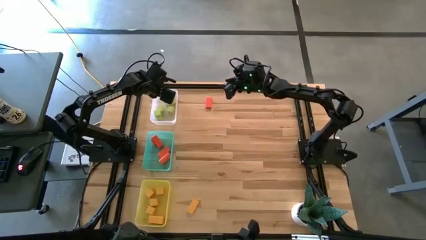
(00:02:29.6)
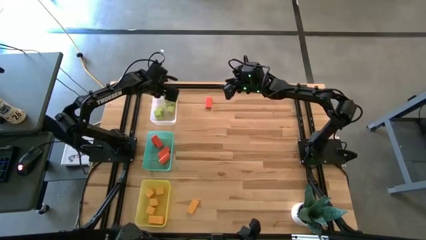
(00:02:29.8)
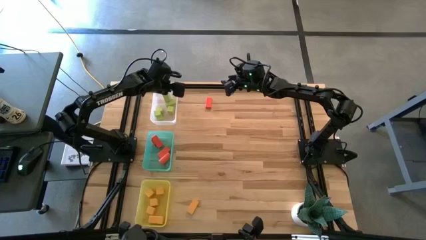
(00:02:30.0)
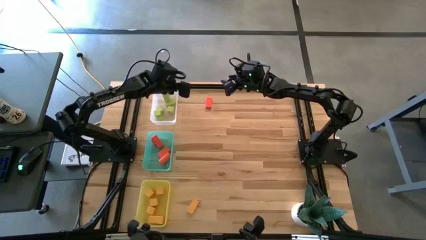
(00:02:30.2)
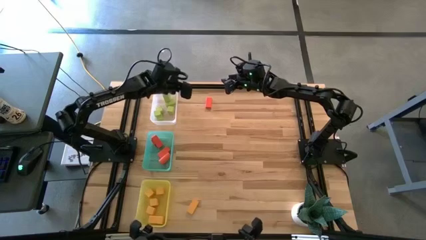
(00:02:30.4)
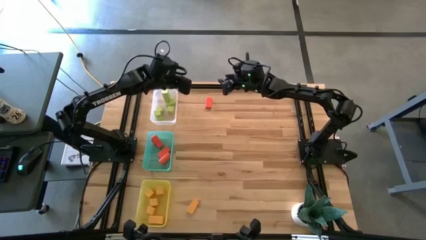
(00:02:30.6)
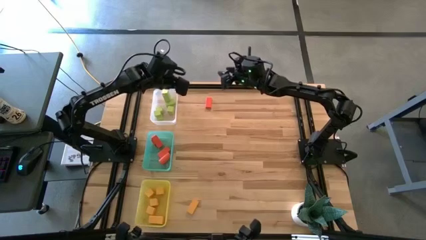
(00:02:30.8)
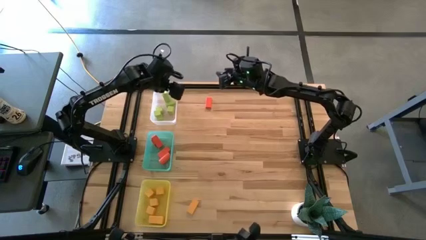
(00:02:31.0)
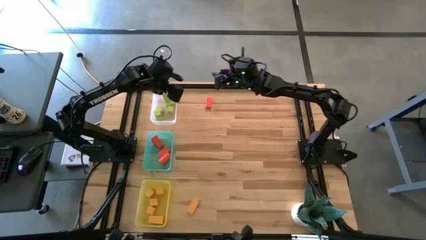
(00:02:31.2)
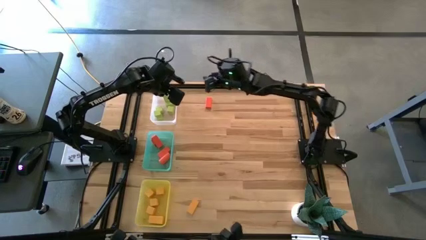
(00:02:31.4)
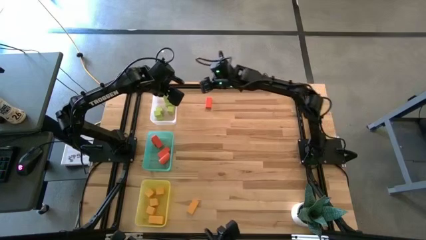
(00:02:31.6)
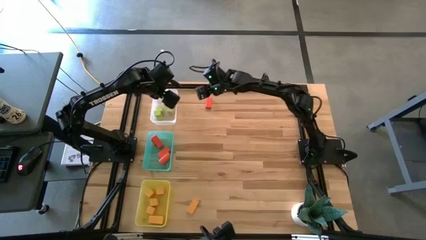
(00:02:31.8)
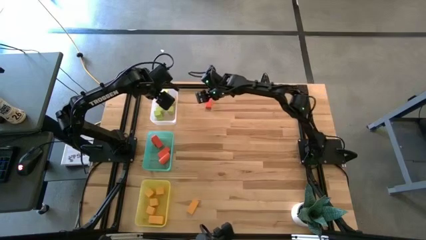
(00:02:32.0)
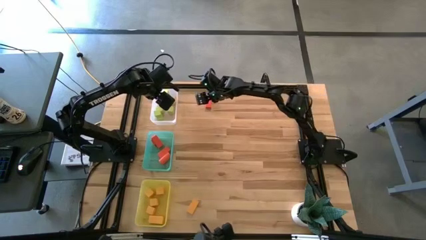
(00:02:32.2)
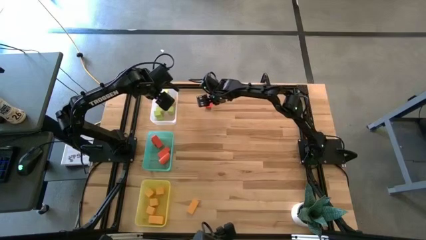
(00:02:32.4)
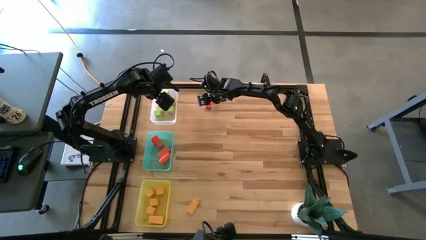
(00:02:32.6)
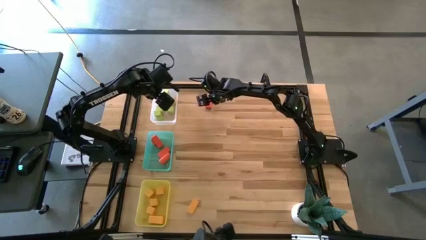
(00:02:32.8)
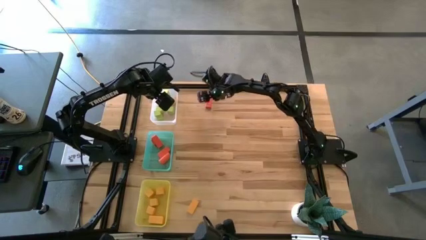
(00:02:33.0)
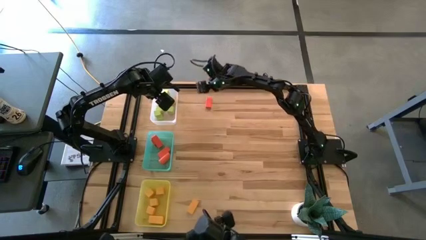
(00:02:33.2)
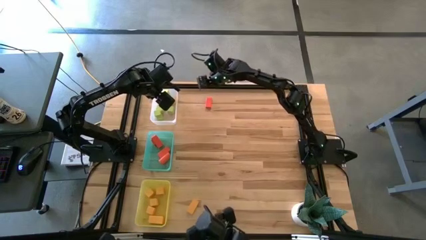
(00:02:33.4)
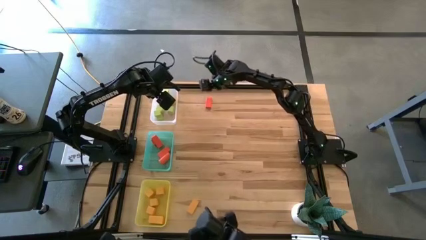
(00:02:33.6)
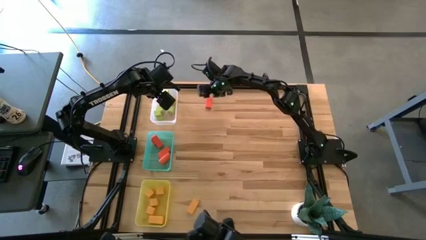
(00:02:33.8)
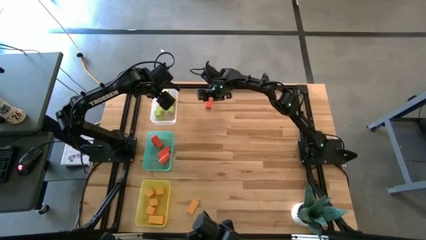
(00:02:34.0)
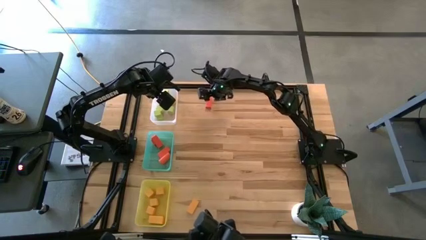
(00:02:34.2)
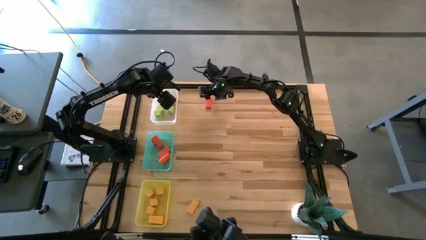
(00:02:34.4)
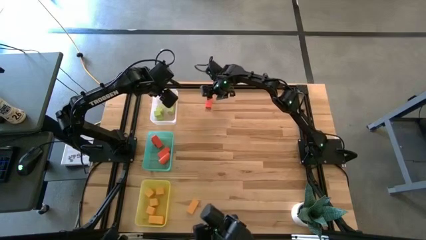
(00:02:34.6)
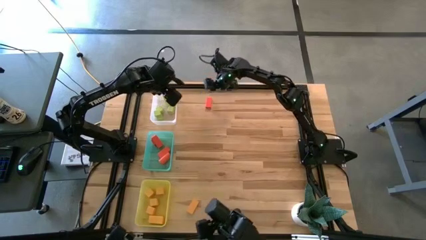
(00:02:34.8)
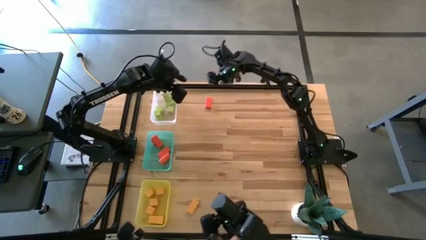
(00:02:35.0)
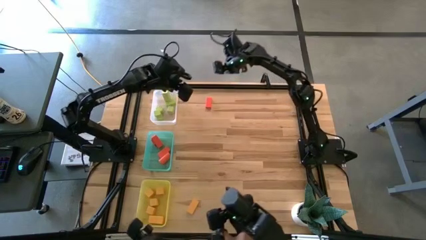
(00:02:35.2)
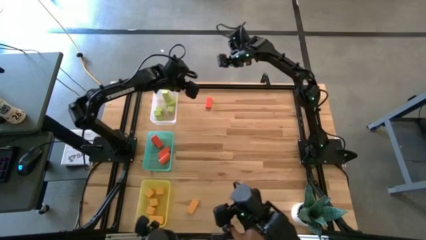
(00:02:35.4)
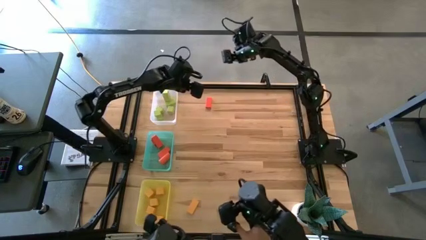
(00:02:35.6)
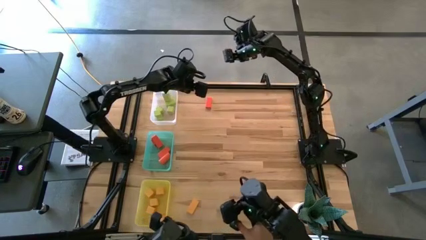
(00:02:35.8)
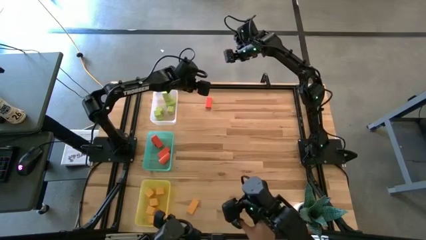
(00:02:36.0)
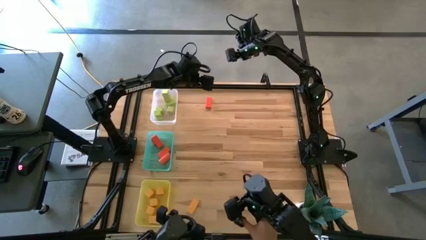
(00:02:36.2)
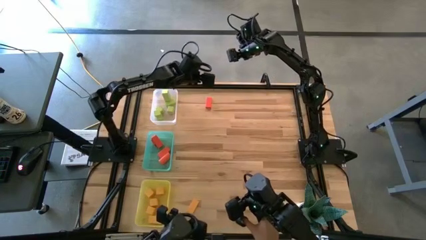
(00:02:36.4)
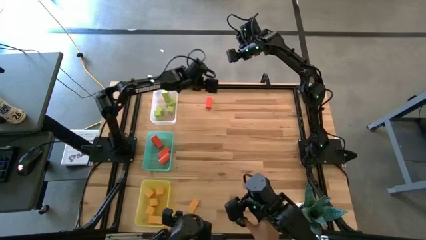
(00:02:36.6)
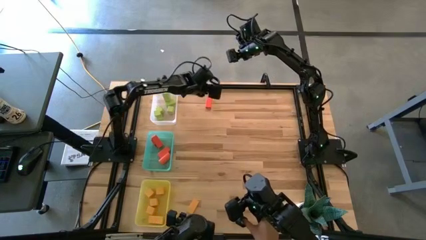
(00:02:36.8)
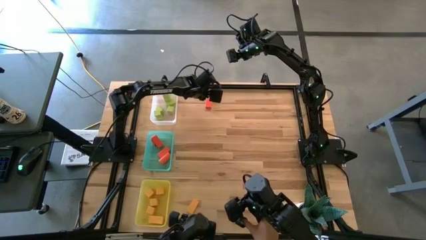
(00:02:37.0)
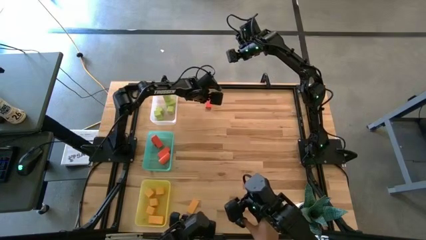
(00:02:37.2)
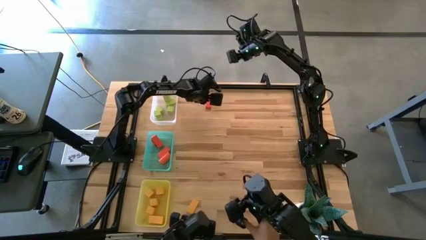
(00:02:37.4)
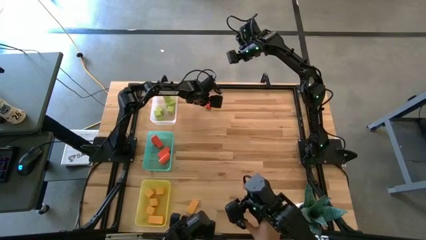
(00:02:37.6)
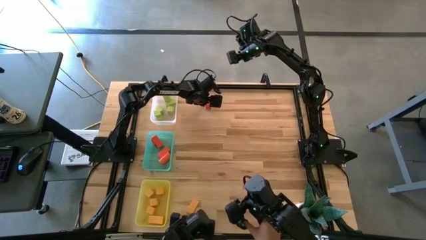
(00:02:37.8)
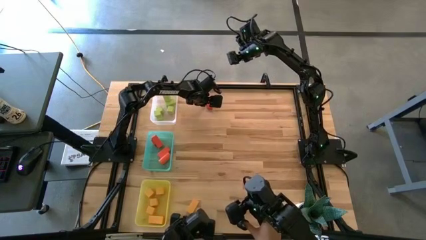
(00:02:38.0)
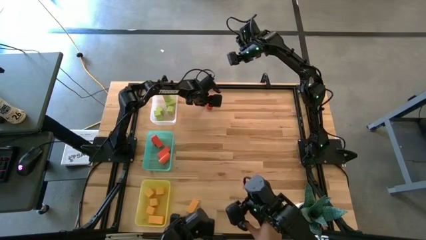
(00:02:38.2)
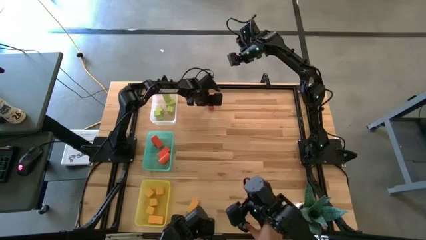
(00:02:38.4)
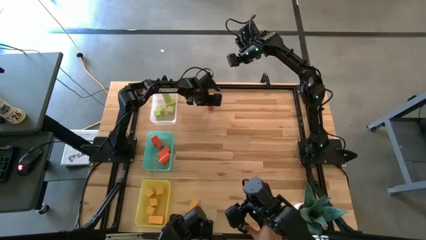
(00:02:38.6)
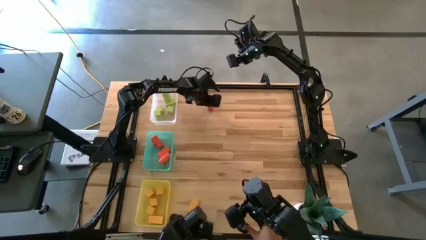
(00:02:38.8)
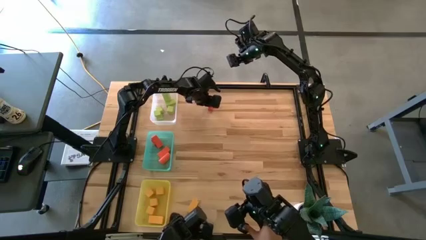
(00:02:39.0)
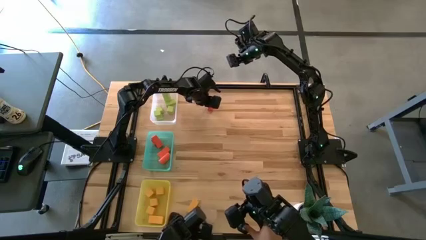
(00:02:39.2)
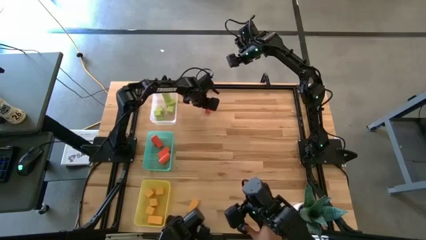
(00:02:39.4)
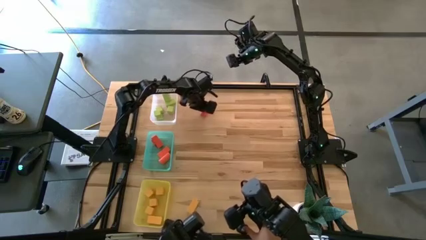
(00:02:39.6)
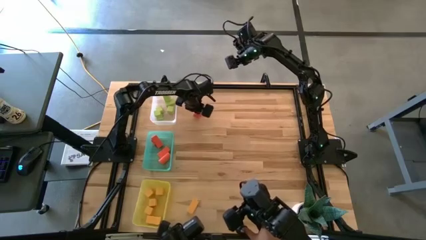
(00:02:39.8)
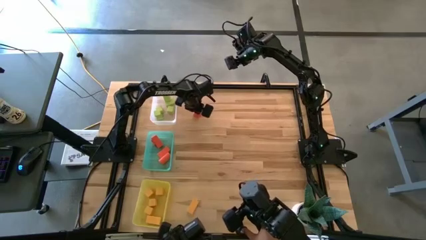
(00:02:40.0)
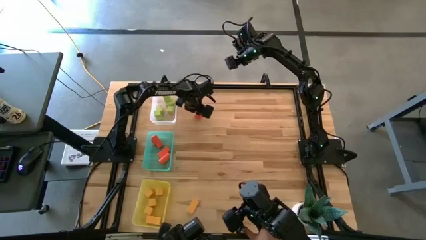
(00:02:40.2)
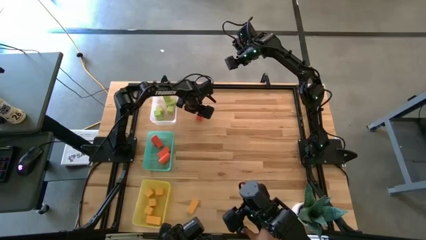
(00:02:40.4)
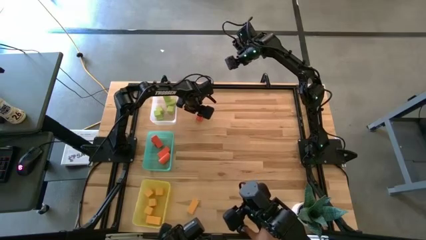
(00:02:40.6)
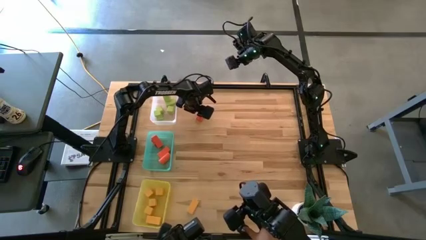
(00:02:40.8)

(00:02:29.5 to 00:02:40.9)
Task: Sort & place blocks by color
Put the orange rectangular block into the green bin

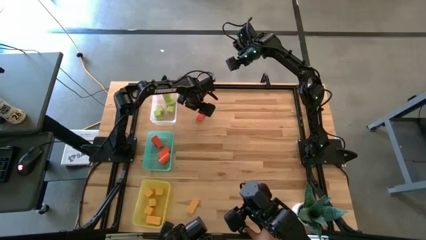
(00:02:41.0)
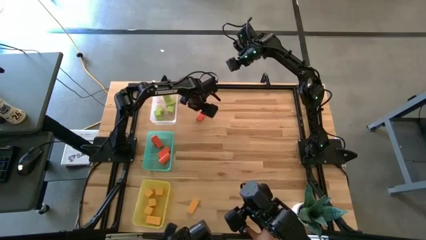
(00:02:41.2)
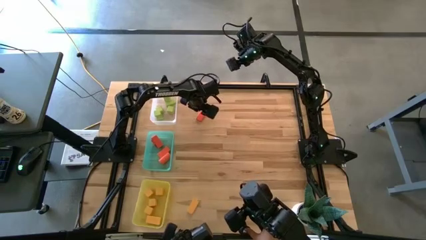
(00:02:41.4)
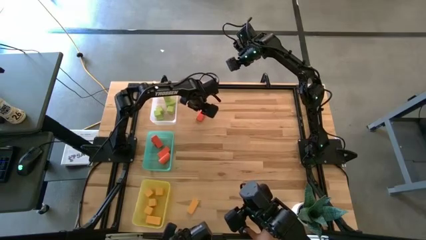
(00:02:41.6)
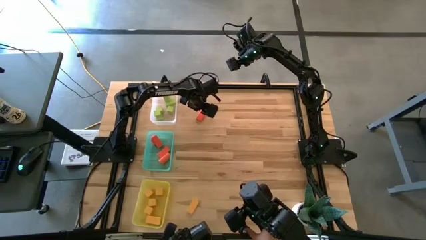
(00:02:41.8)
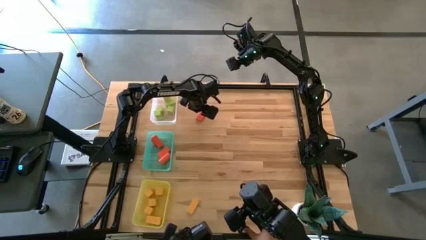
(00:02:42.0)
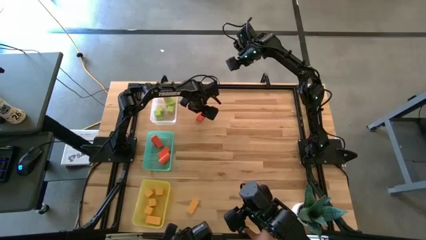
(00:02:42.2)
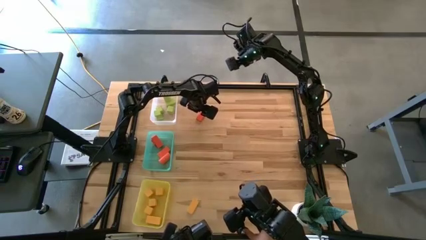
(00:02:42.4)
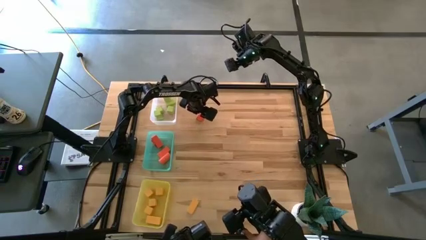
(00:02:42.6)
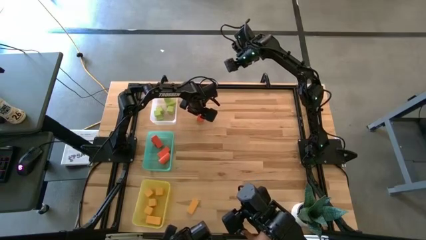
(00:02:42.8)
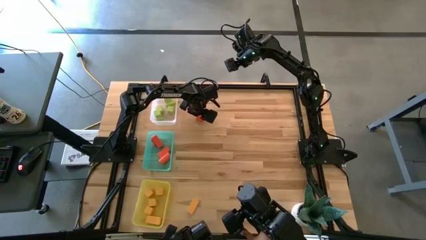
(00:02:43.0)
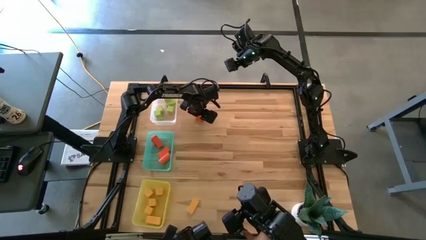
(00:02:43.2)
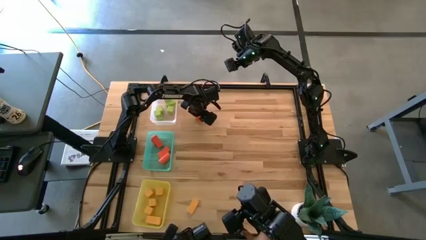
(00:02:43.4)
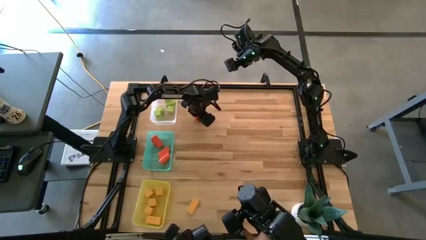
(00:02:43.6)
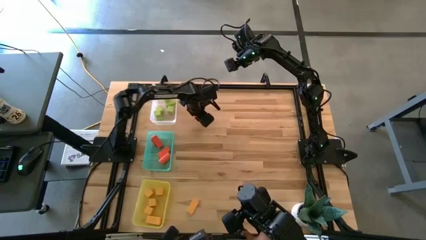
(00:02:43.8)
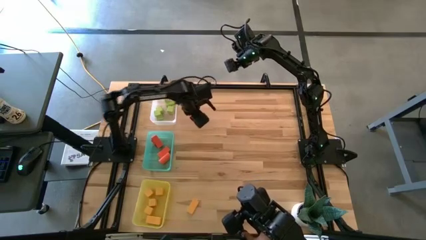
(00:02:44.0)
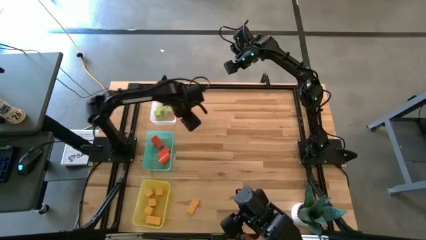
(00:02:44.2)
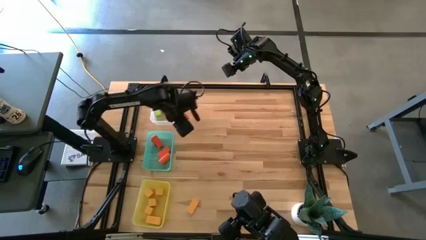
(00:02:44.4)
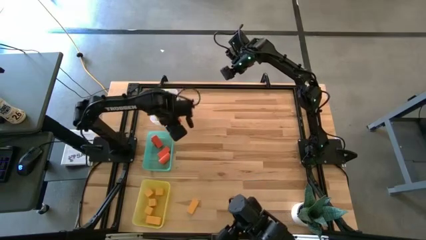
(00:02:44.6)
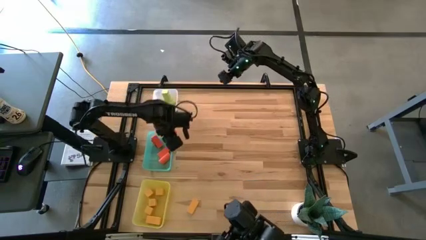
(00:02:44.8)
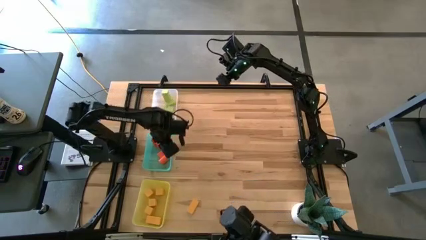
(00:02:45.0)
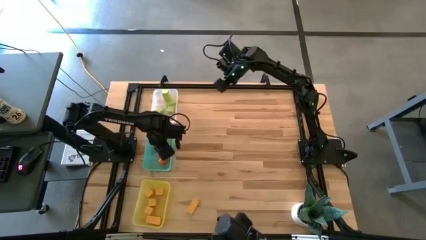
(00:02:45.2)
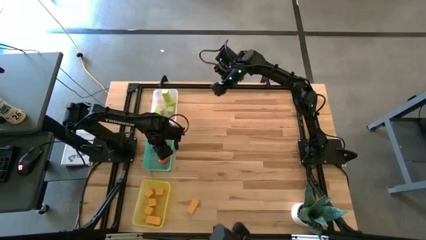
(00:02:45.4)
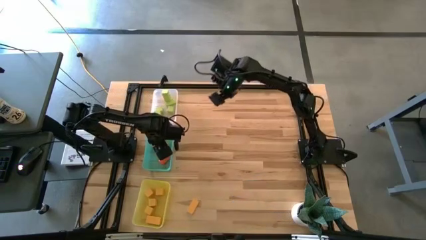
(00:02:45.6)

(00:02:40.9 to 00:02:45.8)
Put the orange rectangular block into the green bin
